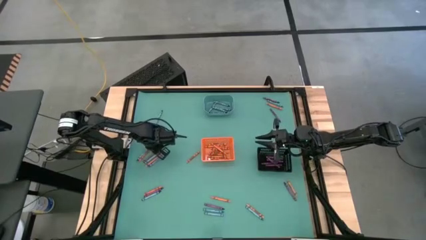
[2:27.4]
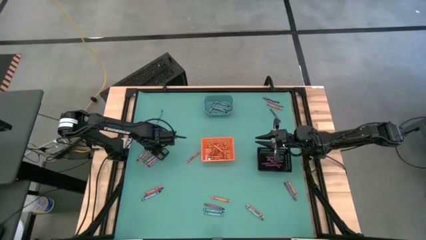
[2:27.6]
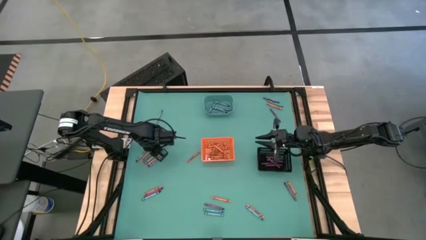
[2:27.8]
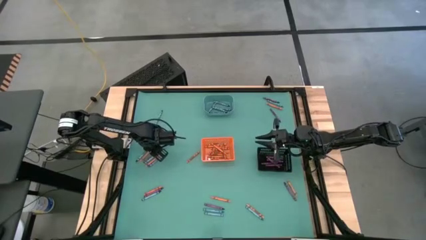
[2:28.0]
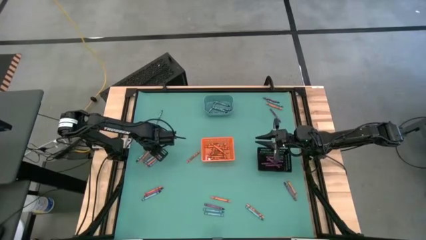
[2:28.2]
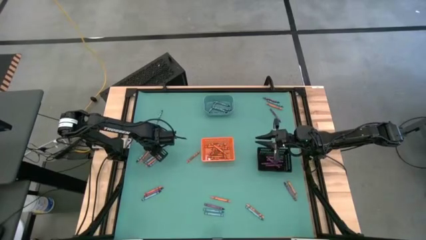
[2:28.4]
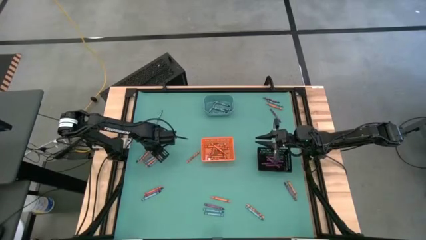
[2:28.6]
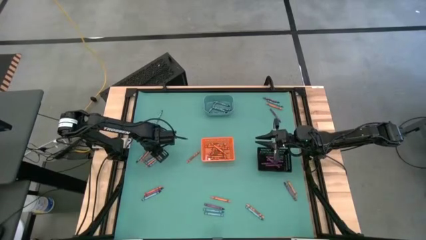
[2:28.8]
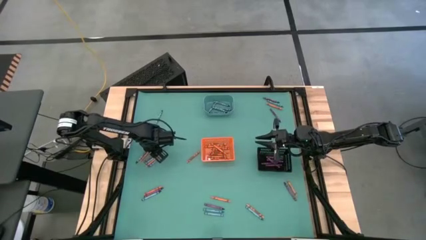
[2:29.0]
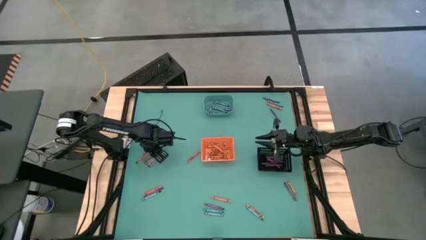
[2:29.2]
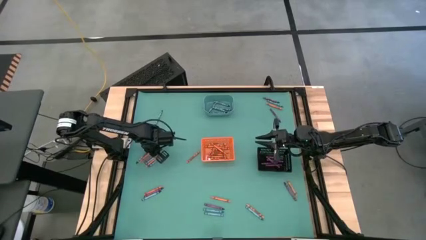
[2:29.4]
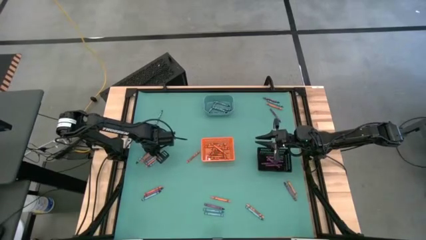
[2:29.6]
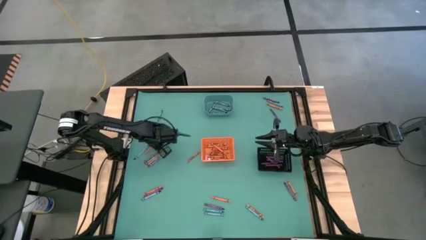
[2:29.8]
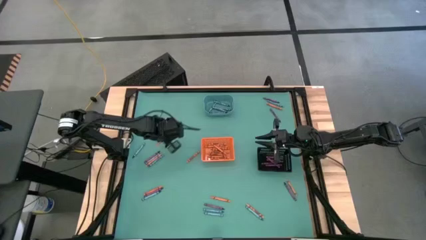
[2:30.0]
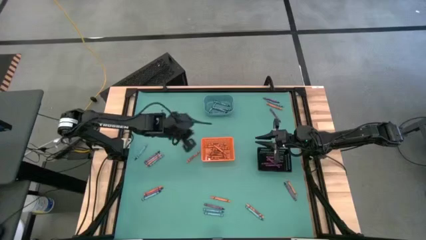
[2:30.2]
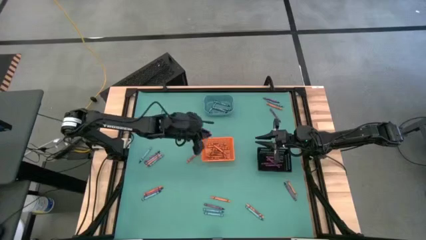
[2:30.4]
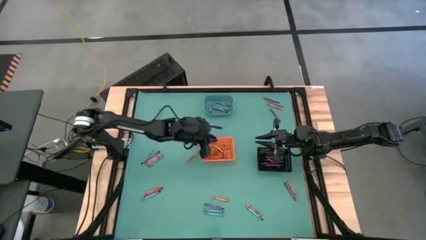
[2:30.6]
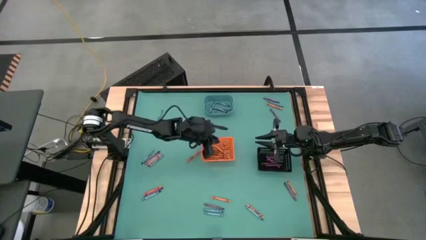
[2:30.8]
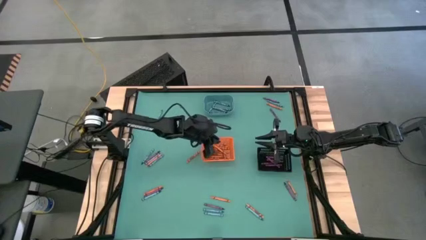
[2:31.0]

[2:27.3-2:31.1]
Task: Sort crayons
Put the orange crayon into the orange bin

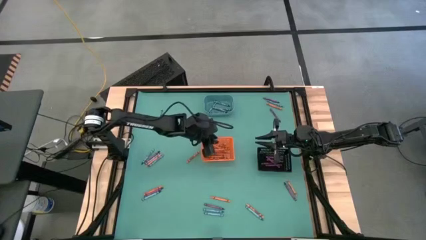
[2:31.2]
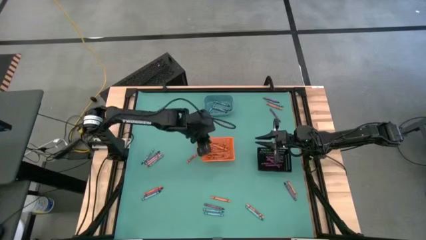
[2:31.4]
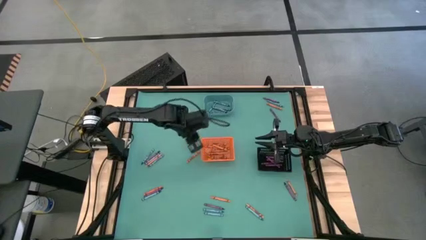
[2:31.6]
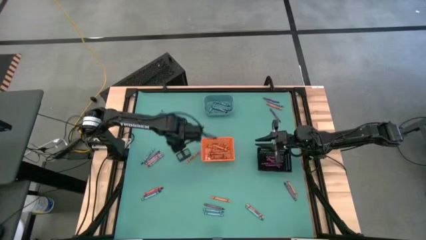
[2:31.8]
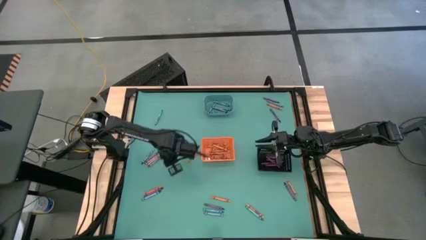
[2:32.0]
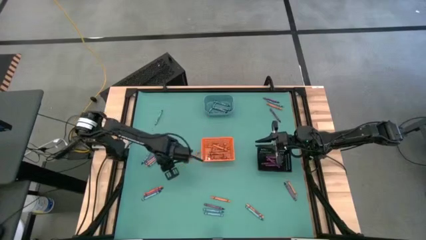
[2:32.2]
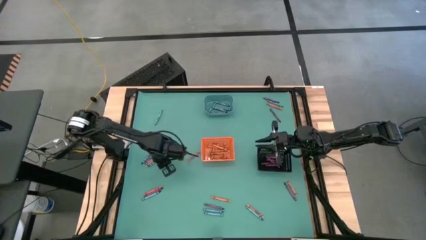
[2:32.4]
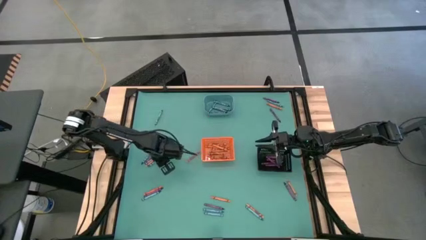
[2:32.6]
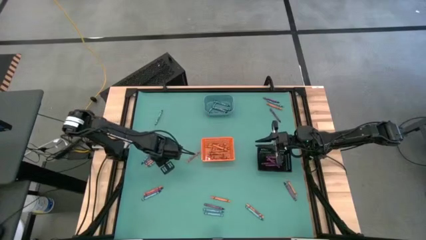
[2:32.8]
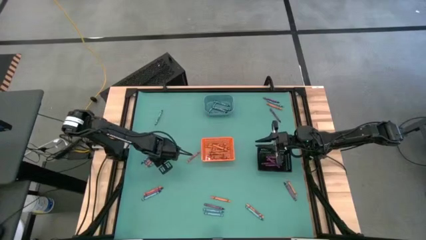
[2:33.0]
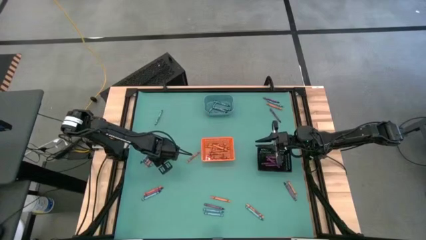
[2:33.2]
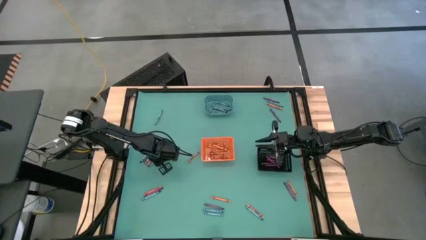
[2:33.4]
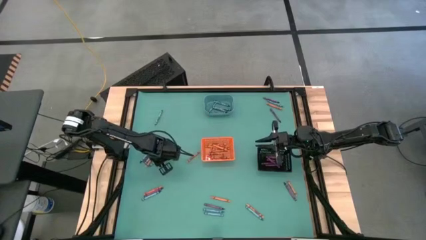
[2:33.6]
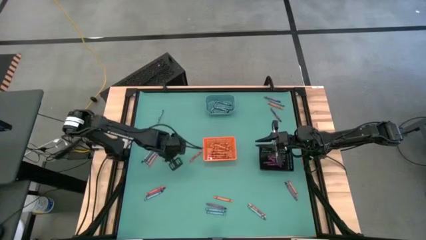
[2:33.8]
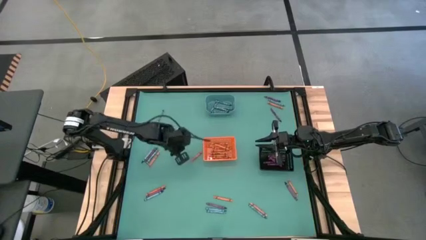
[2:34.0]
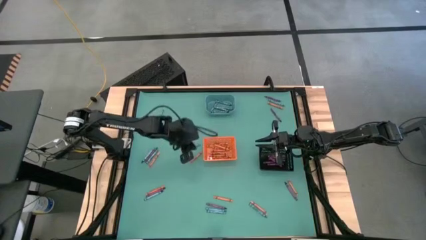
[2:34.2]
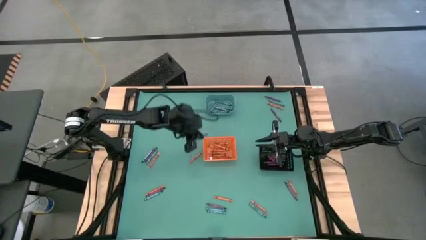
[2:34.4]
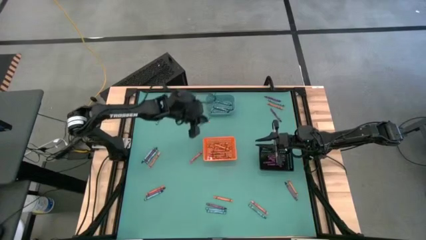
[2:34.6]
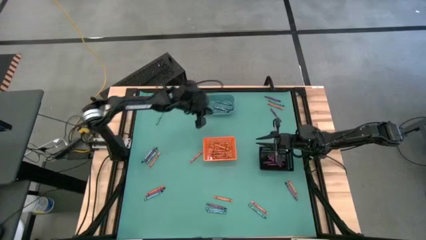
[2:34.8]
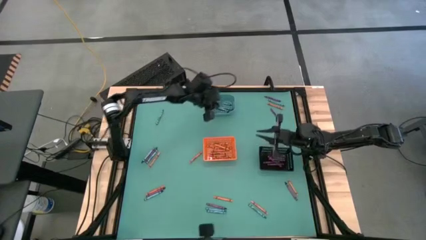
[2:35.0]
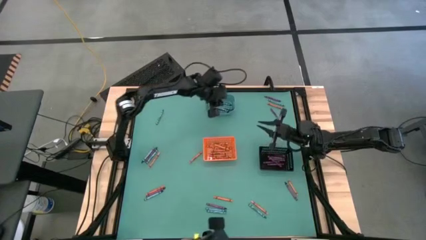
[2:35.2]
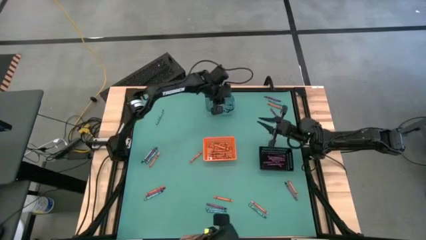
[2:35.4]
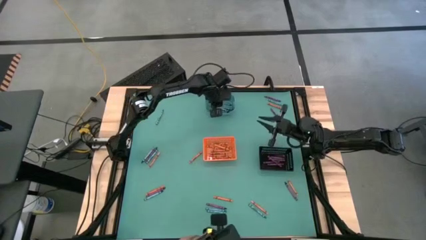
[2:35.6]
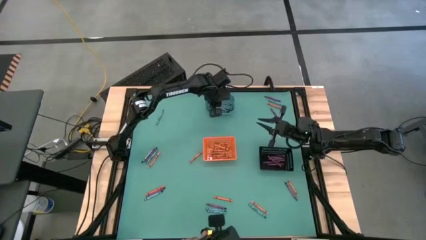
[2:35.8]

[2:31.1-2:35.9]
Put the green crayon into the blue bin

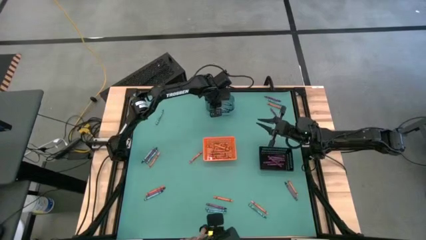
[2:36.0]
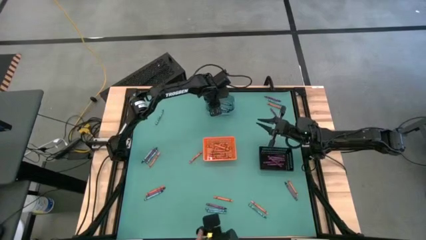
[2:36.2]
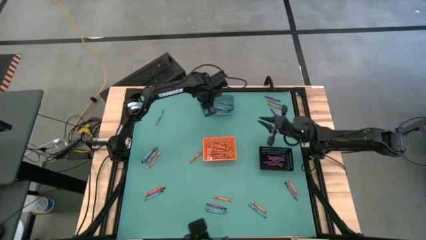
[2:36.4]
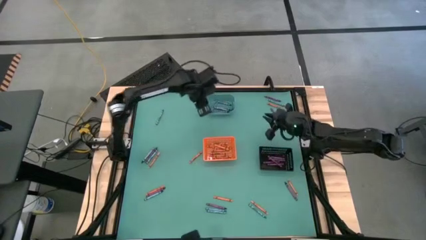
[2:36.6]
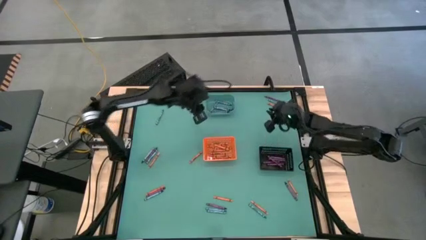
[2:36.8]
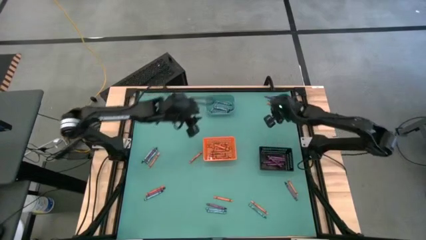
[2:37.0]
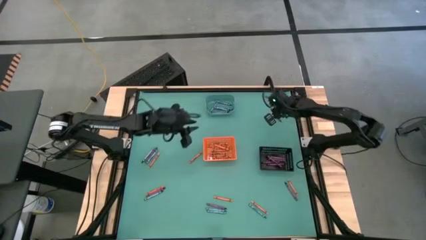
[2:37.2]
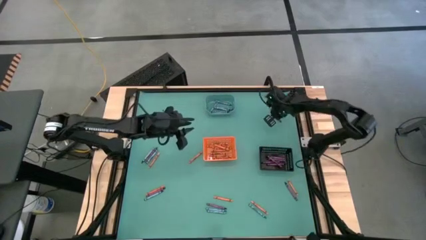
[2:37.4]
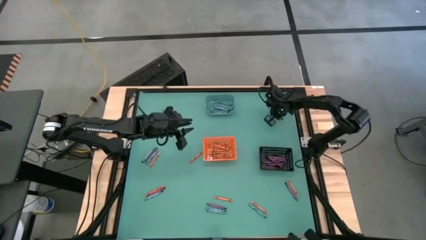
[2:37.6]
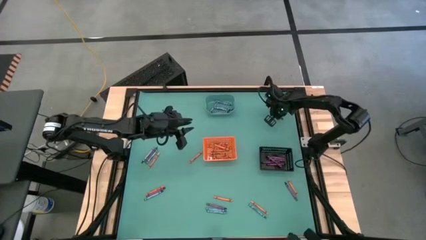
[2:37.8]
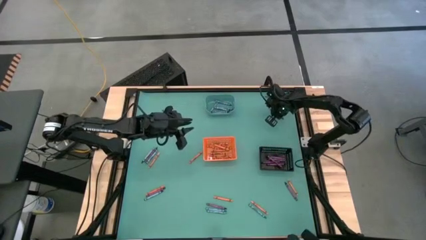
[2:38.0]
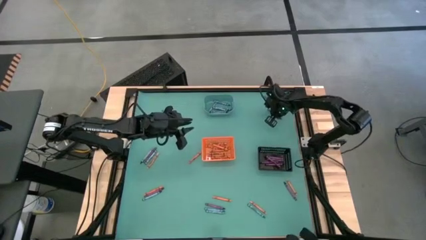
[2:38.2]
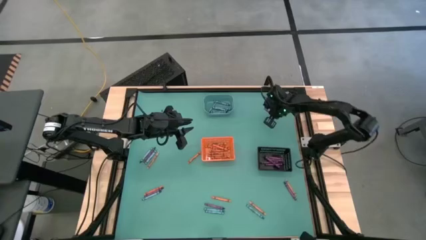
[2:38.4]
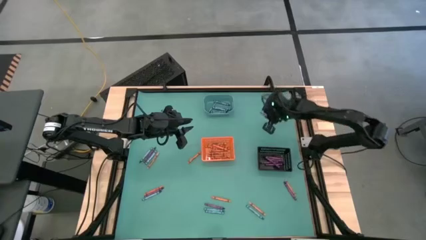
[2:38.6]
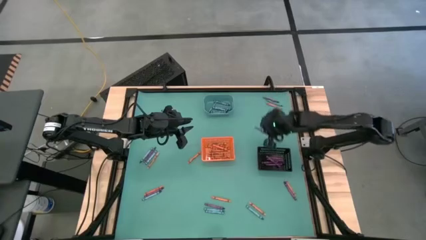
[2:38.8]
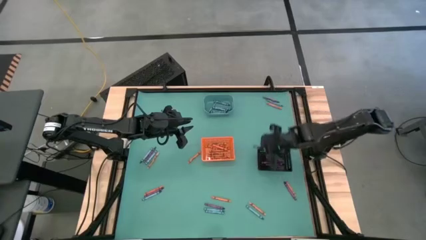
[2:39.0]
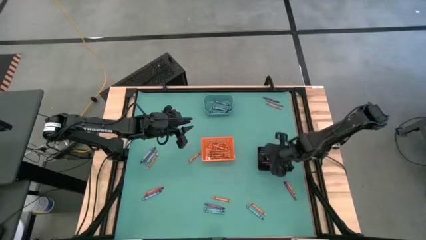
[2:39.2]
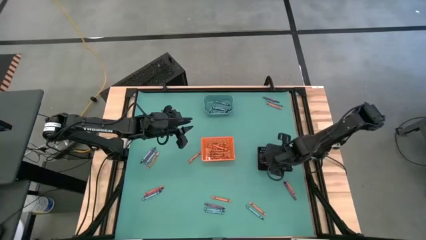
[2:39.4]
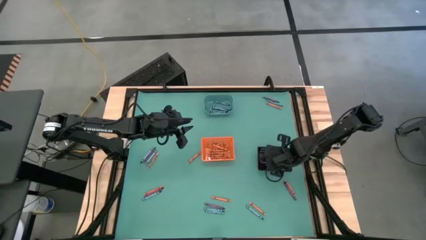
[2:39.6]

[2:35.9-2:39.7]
Put the violet crayon into the black bin

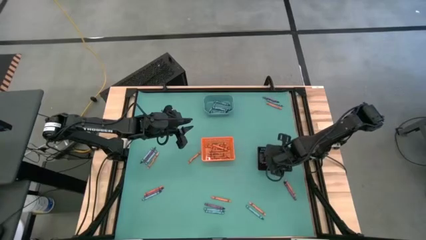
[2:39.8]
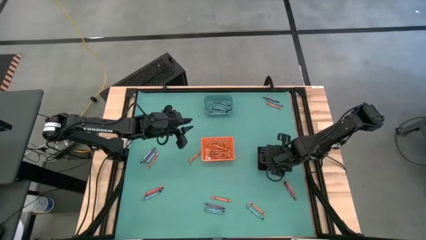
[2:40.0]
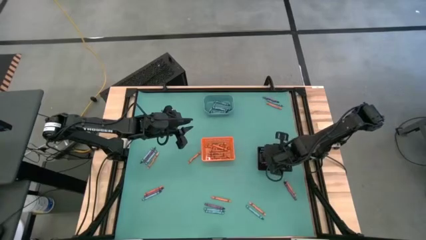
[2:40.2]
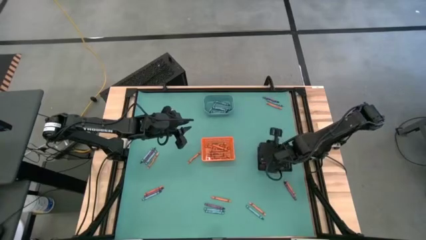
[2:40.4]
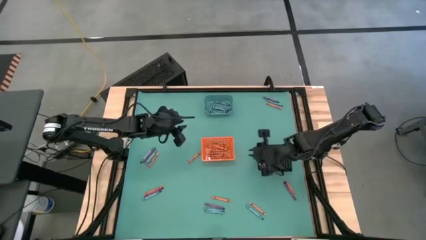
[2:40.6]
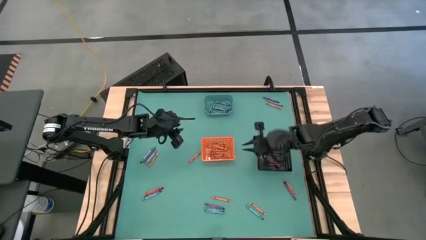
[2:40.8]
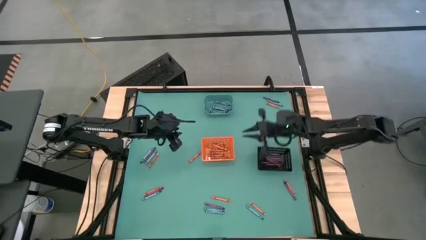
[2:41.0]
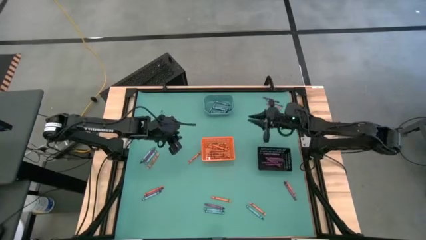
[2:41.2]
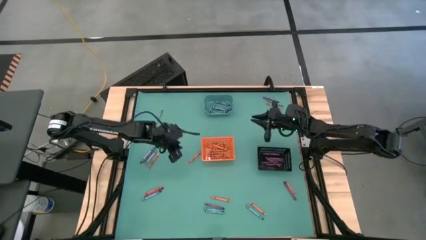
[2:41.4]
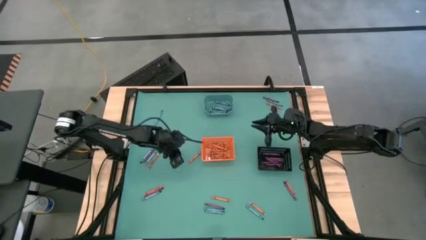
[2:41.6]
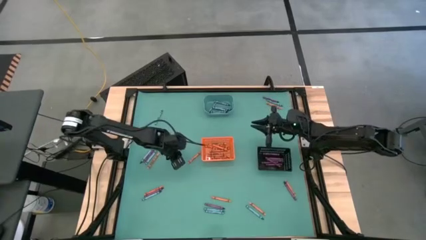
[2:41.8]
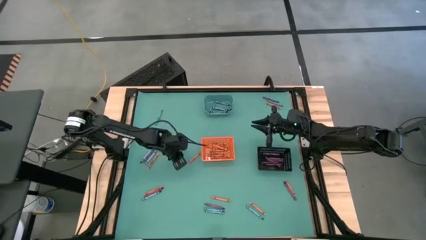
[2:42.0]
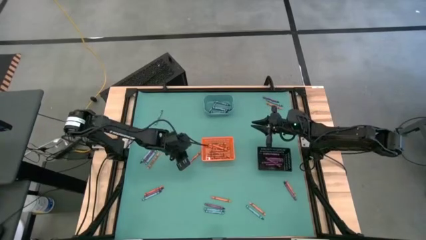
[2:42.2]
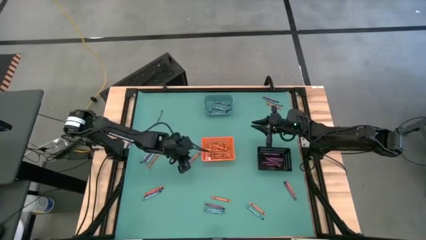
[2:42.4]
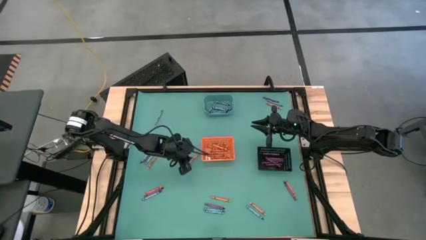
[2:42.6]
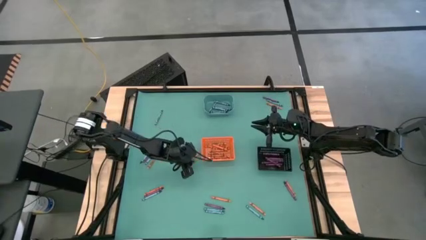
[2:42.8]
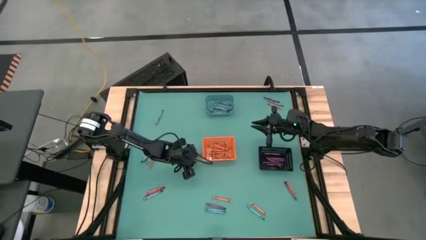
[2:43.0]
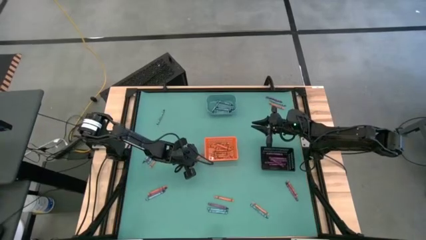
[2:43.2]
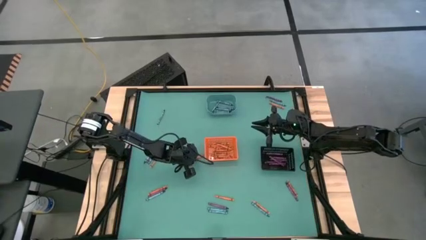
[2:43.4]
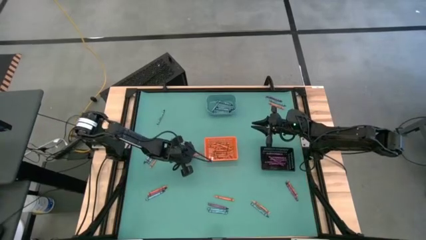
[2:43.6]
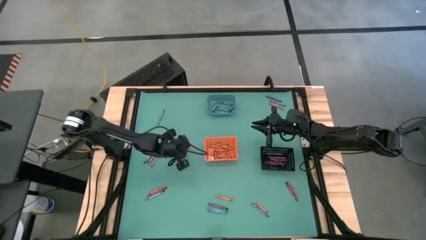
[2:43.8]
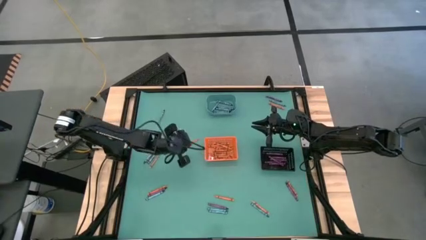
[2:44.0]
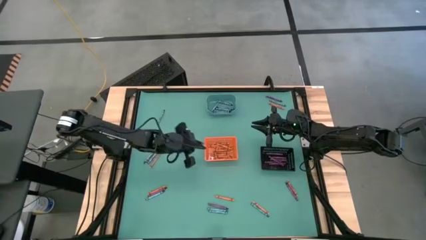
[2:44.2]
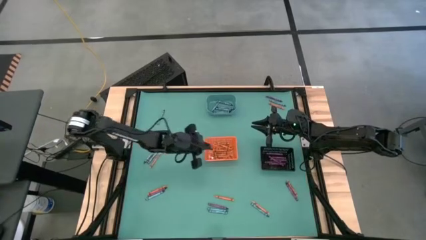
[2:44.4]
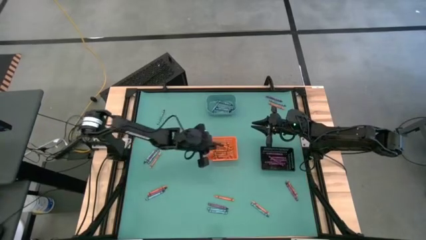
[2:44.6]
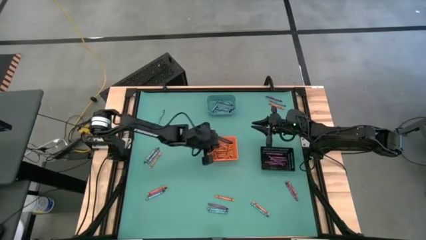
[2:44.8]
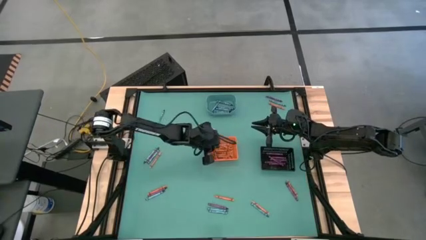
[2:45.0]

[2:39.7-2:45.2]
Put the orange crayon into the orange bin
